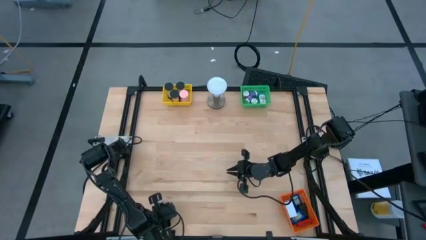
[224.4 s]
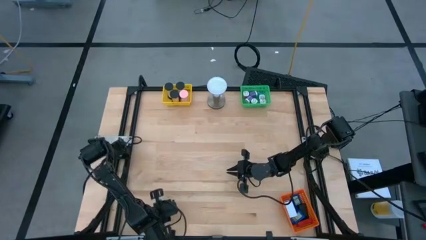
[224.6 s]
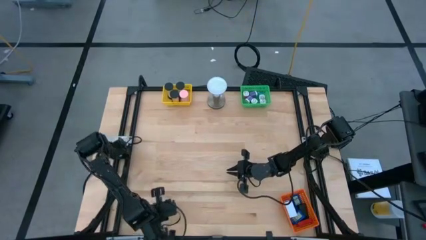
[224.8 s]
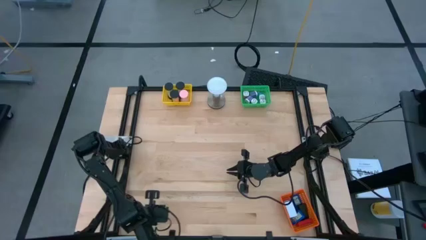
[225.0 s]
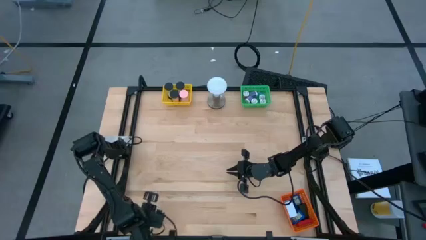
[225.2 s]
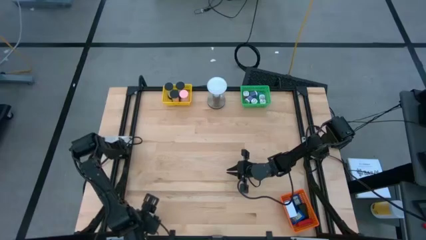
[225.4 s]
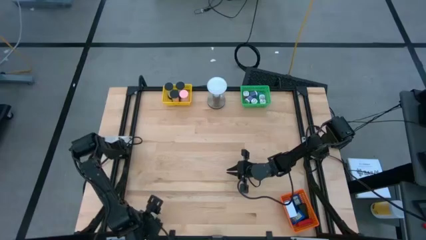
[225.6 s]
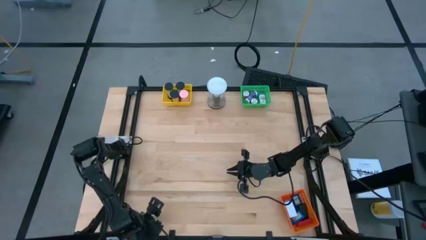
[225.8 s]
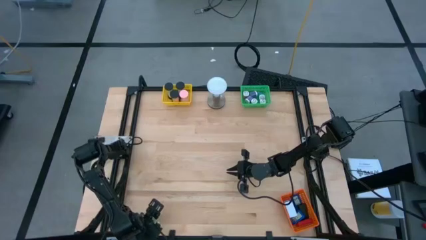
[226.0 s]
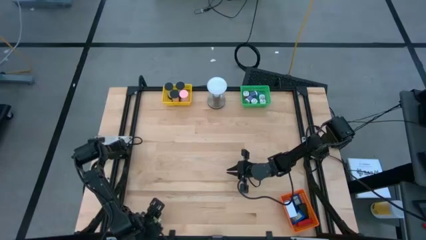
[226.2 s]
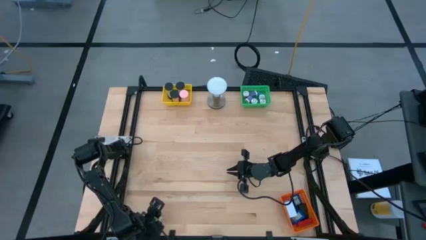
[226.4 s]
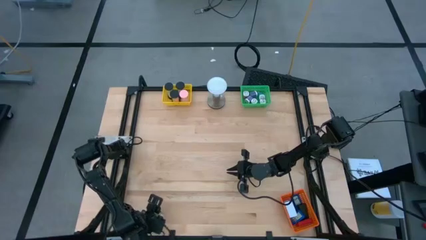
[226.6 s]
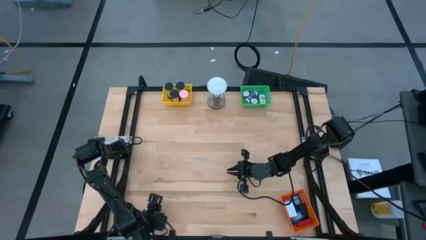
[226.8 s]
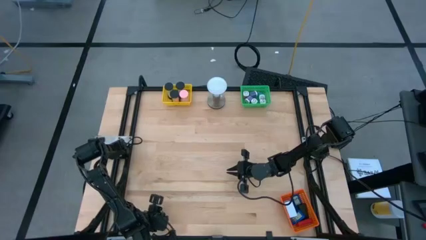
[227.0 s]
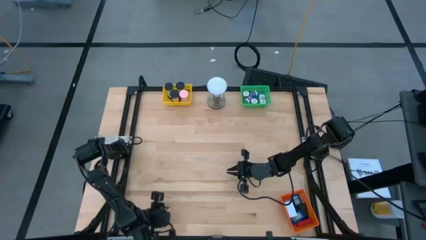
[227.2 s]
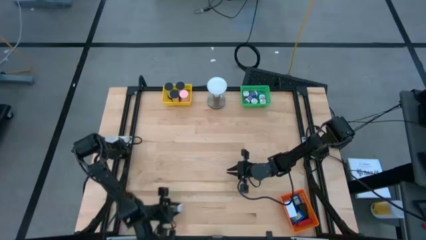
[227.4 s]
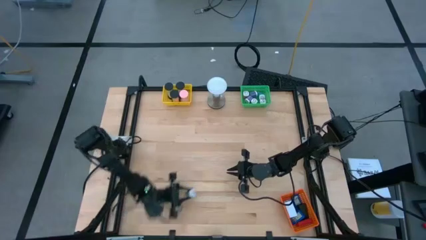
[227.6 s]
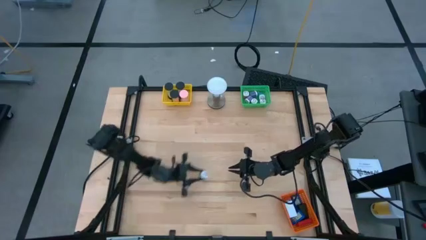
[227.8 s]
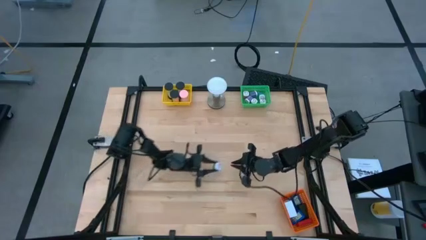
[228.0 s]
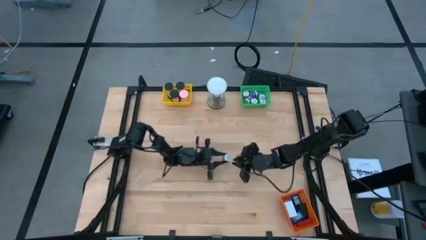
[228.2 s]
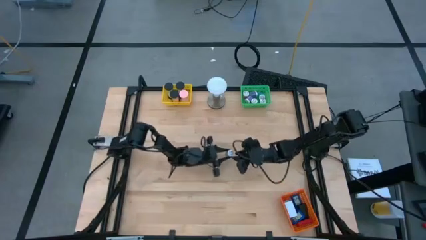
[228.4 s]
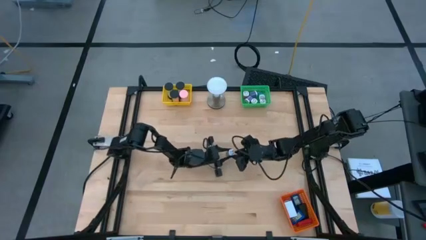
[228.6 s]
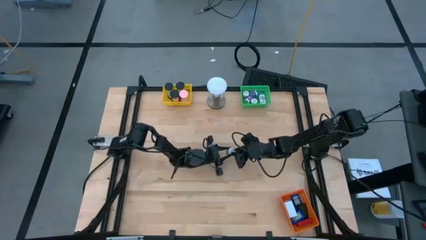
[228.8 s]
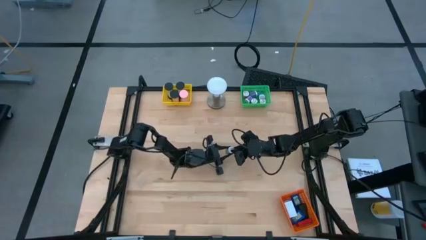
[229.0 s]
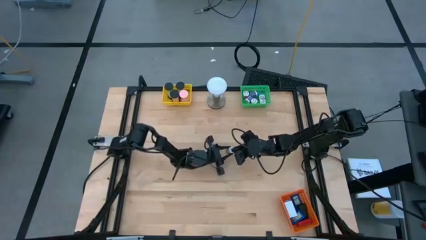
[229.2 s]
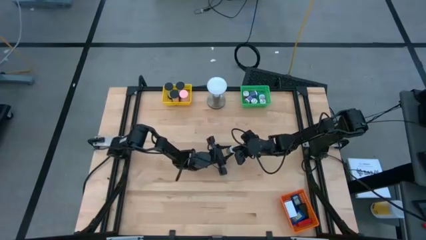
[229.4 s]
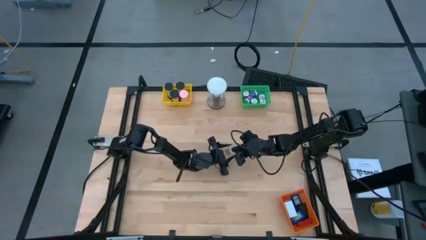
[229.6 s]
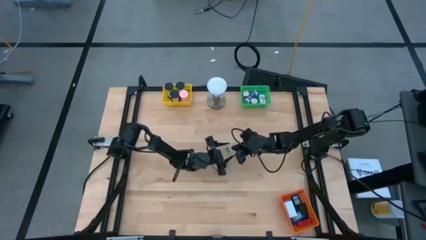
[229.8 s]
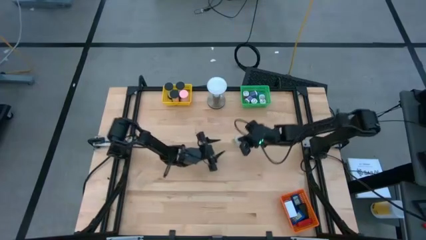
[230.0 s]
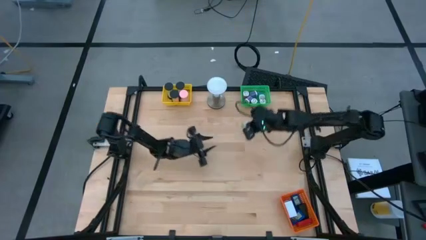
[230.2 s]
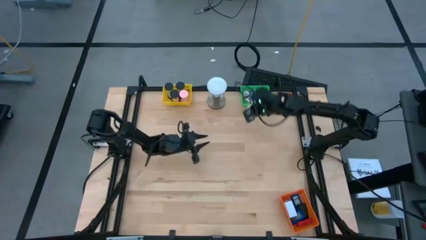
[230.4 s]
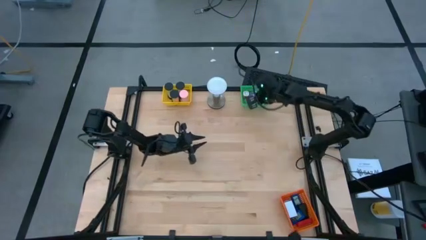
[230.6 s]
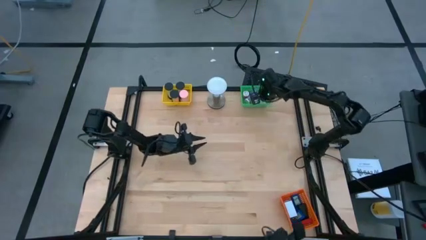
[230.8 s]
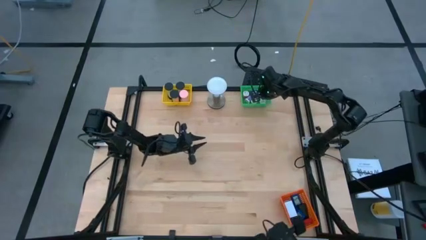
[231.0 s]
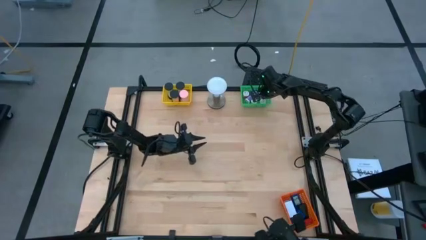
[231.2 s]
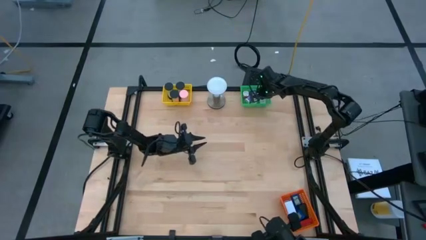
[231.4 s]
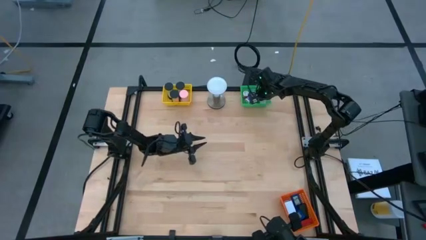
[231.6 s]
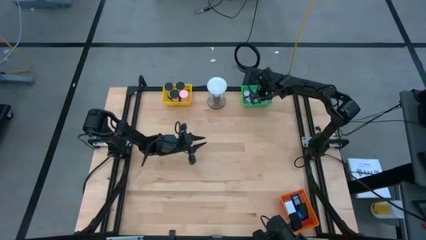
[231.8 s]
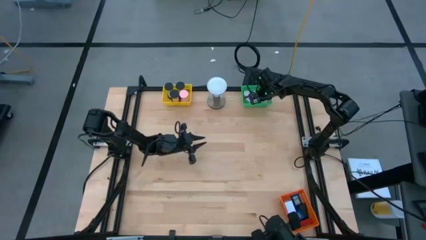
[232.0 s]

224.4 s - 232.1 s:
Task: Pick & Place Office items
Put the green adaptor into the green bin

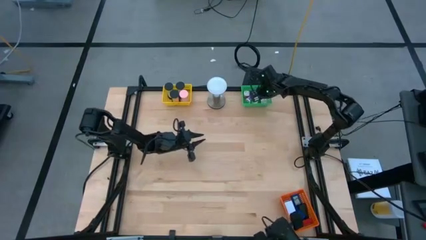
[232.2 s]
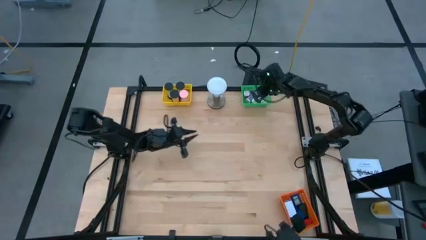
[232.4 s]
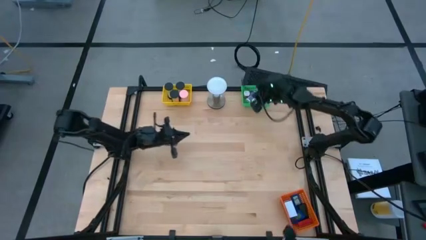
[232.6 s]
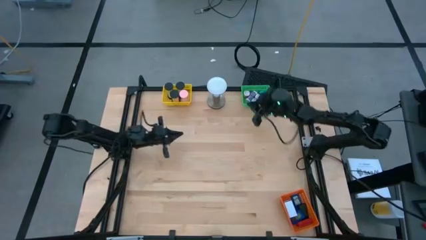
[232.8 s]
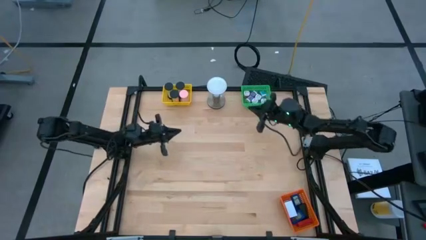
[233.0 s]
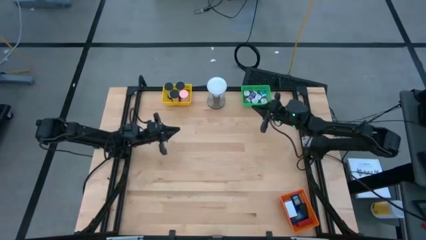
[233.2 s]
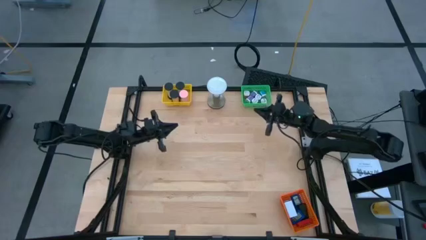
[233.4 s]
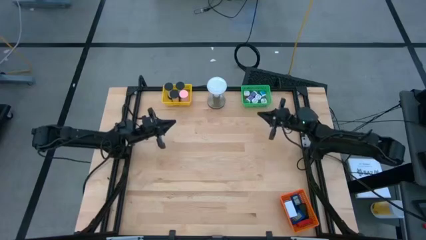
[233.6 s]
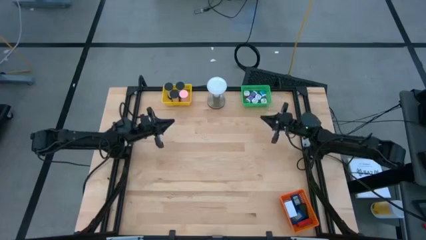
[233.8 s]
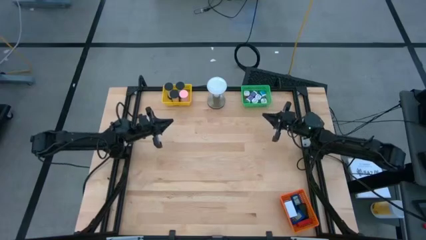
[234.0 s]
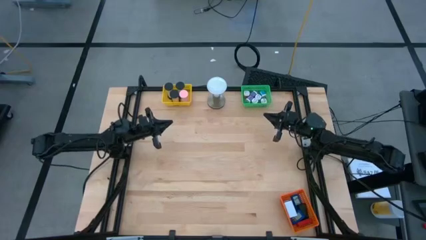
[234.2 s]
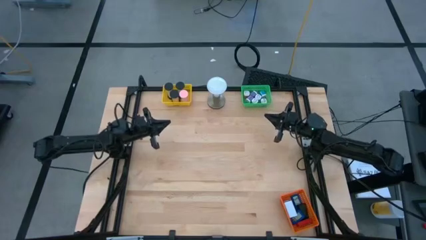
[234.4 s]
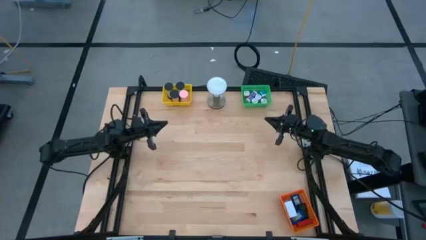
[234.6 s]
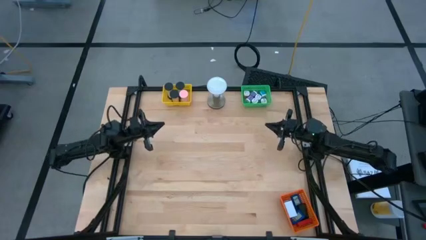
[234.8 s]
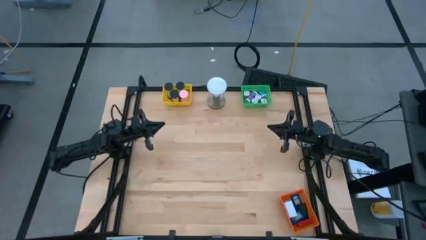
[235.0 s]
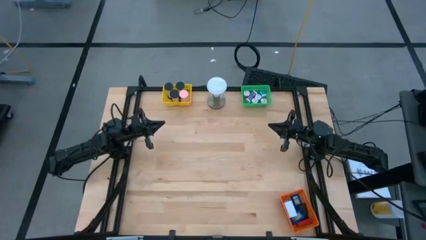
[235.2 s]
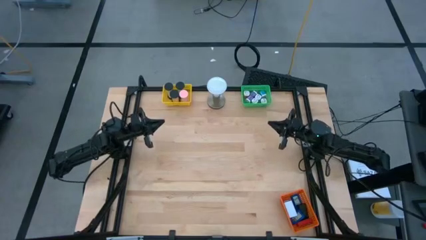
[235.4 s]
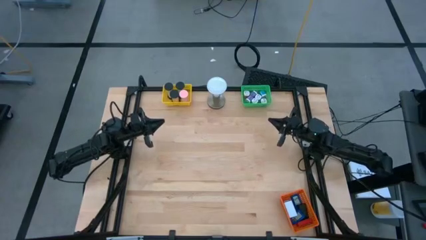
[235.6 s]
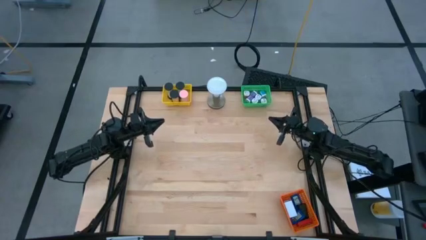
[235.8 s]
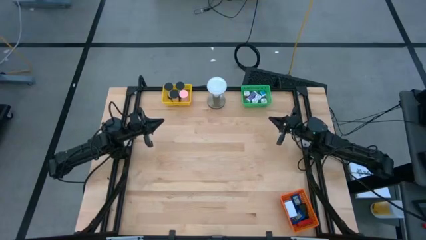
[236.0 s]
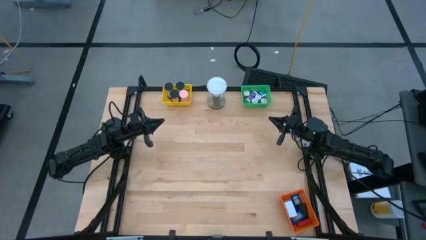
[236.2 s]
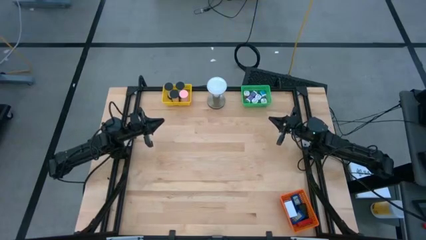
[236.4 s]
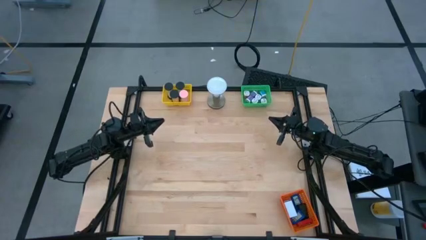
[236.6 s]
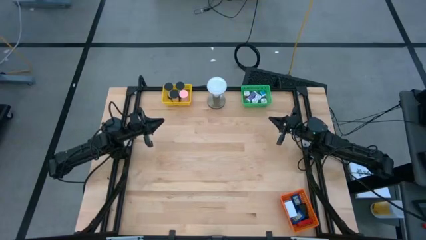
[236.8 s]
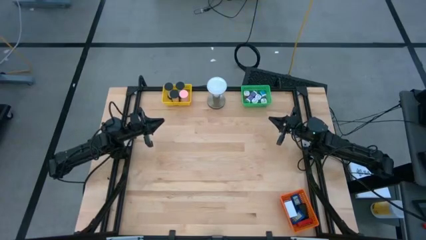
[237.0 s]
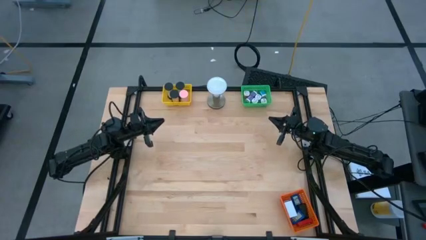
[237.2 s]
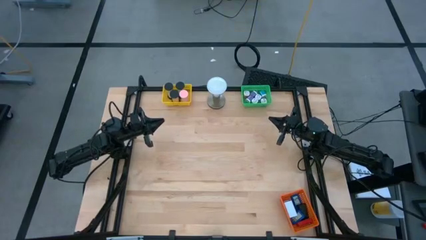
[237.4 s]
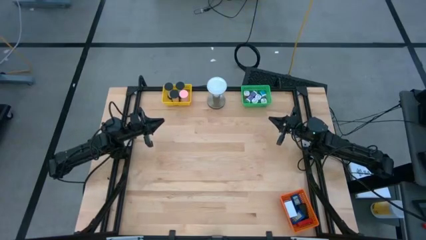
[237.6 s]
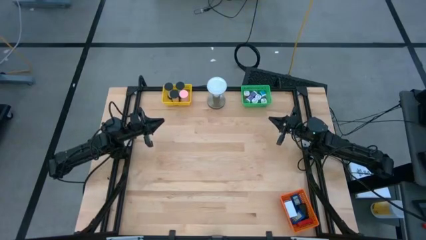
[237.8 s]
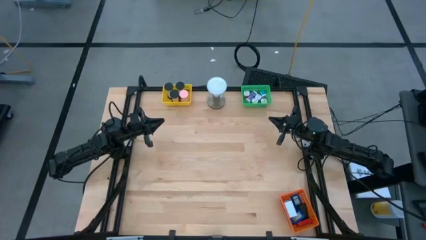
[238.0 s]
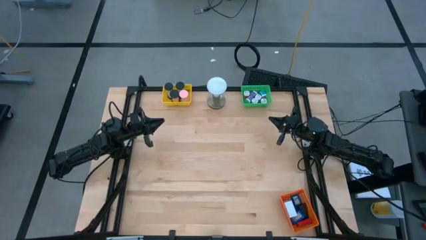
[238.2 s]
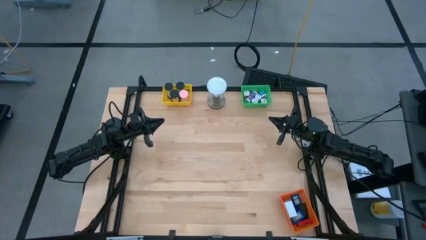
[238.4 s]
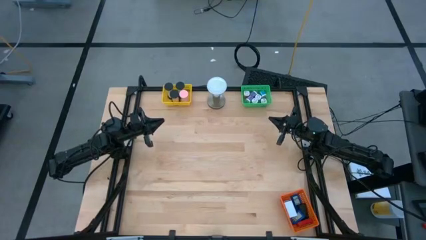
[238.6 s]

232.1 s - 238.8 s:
Return to Home Position
